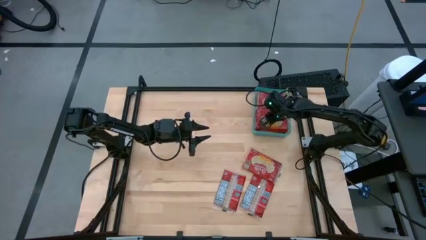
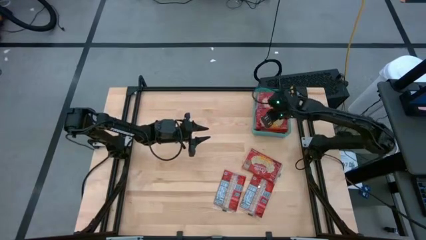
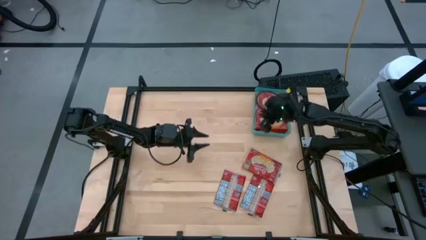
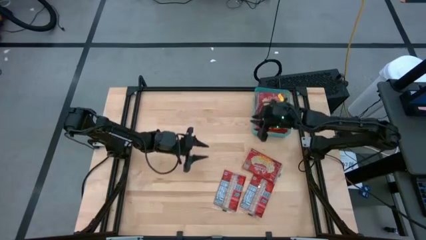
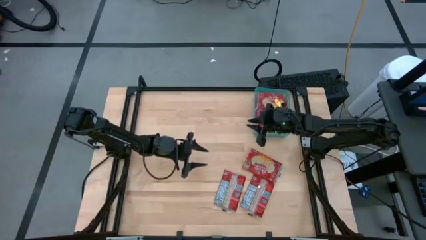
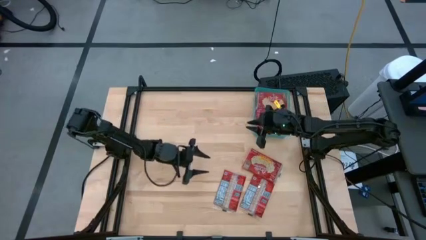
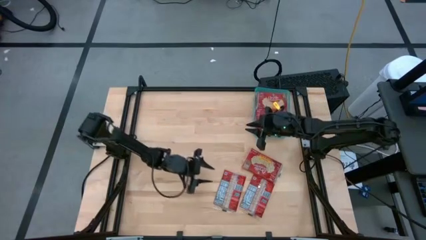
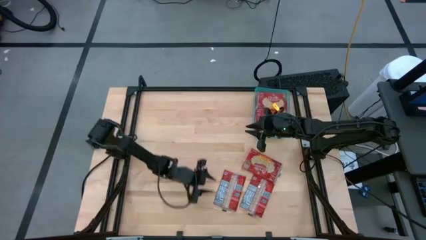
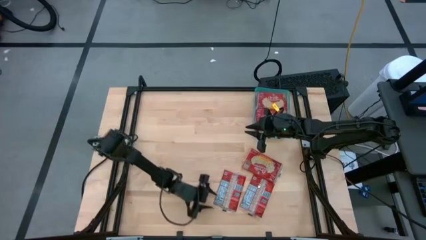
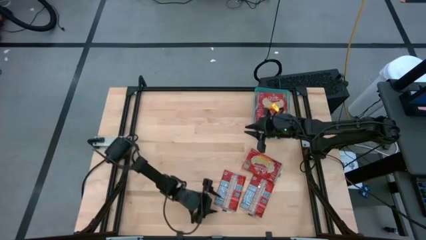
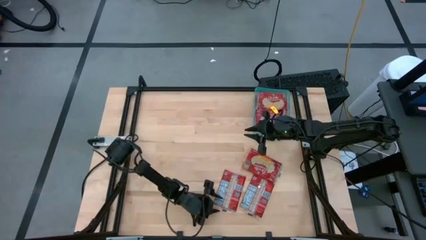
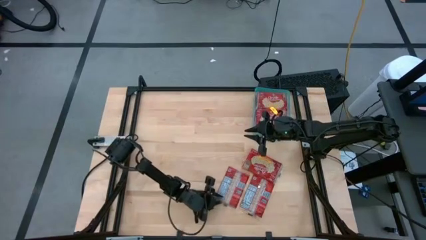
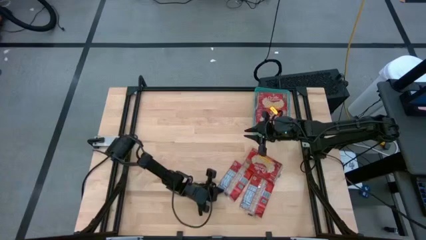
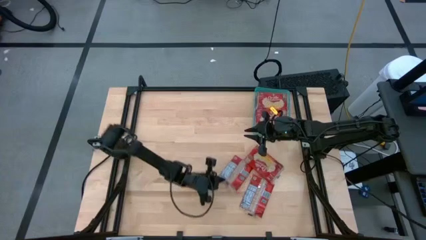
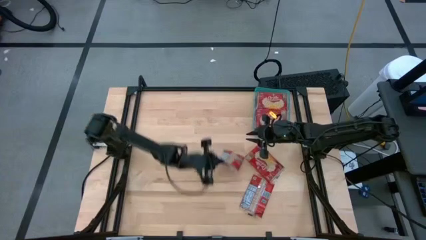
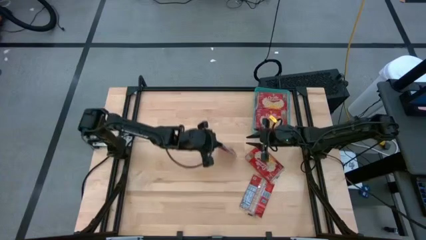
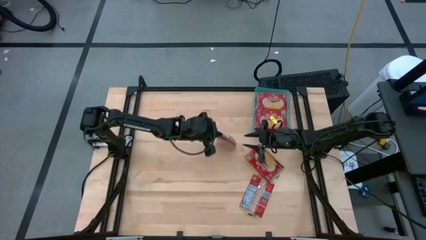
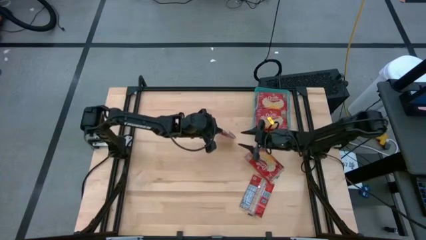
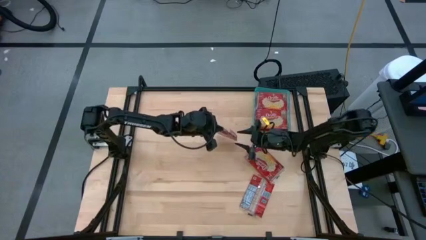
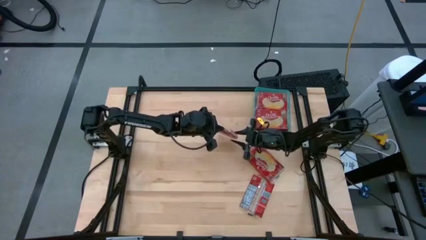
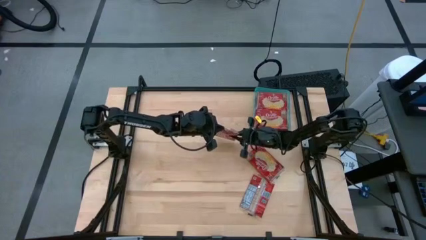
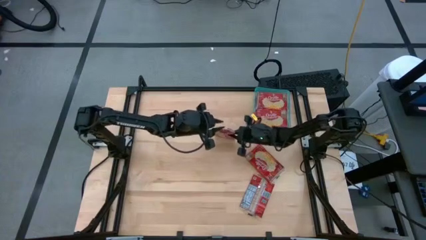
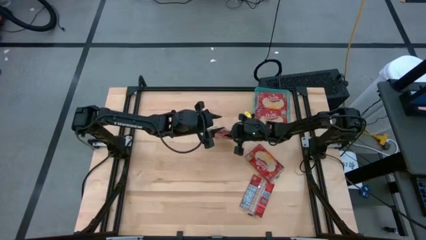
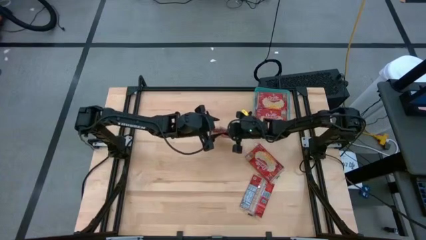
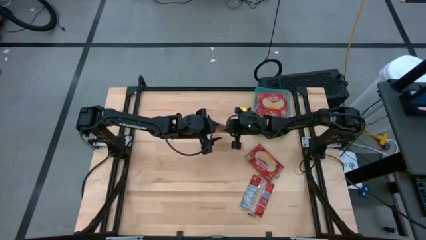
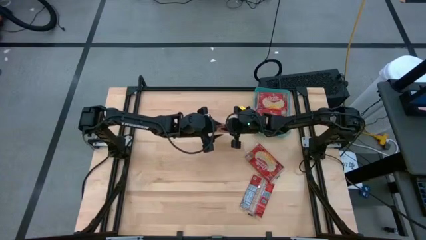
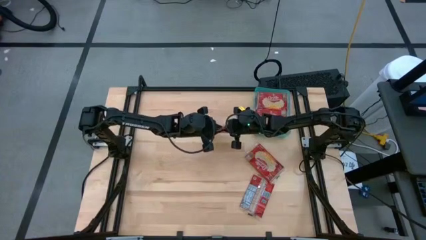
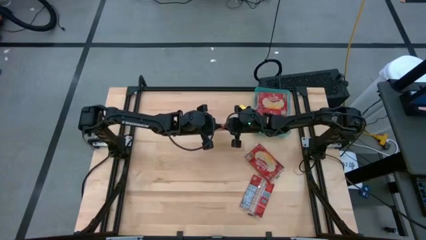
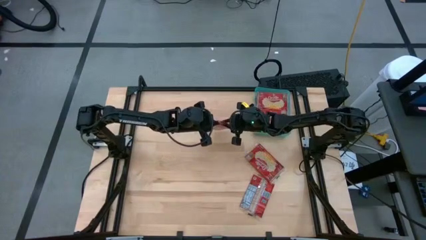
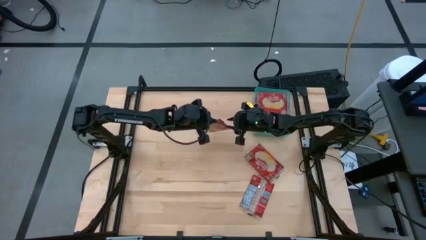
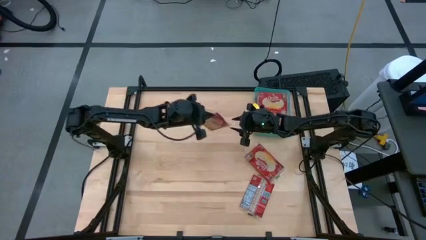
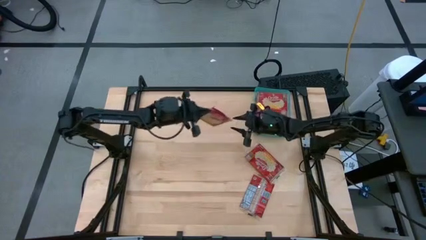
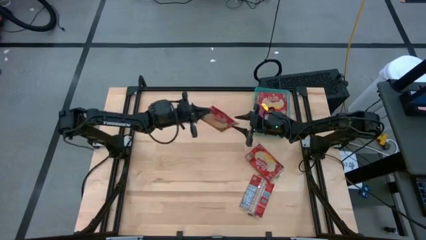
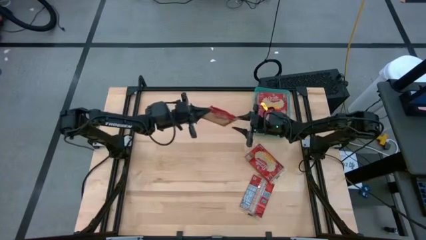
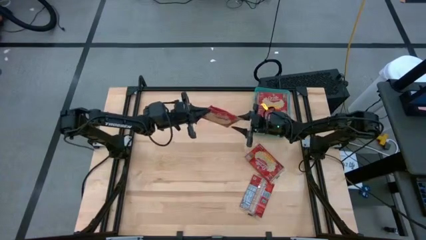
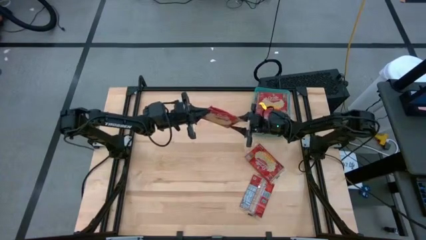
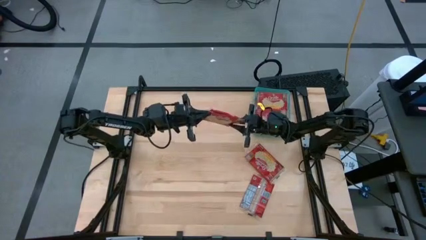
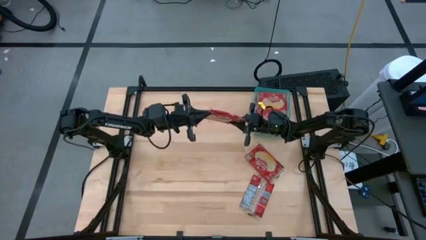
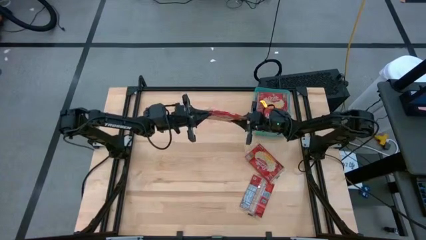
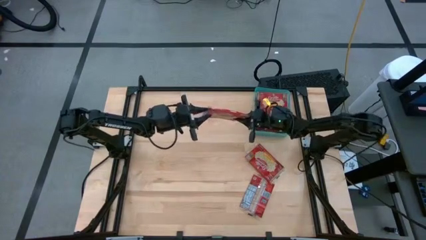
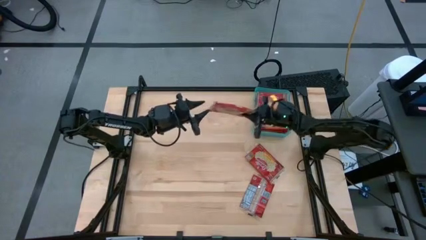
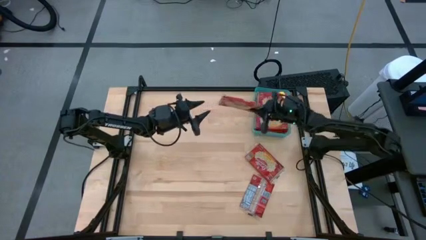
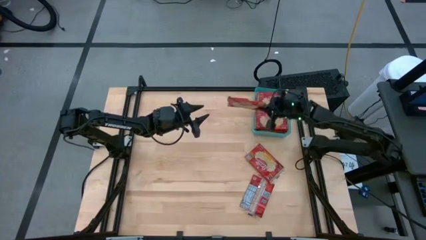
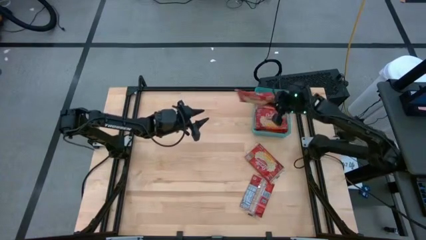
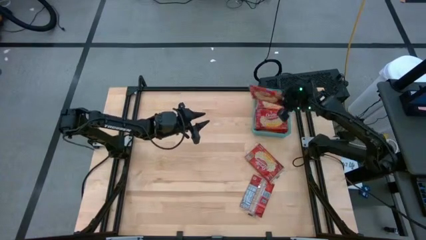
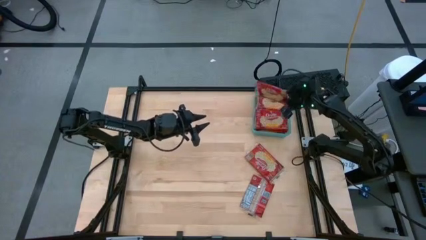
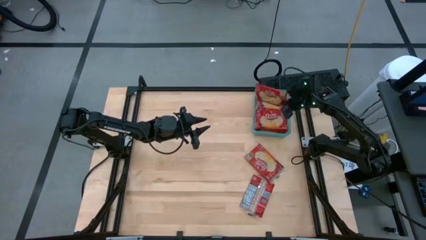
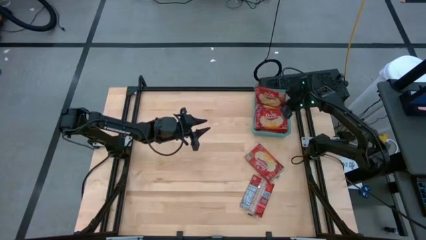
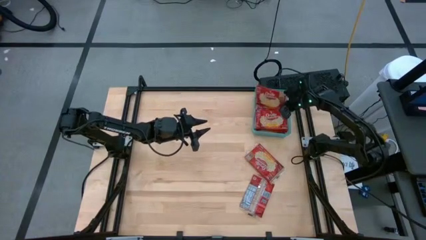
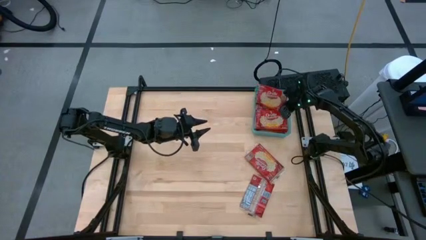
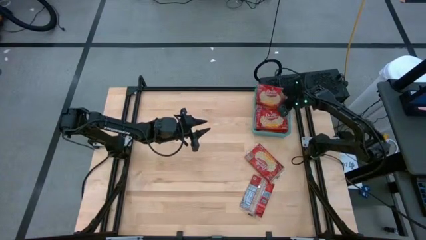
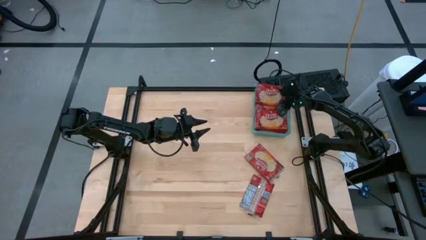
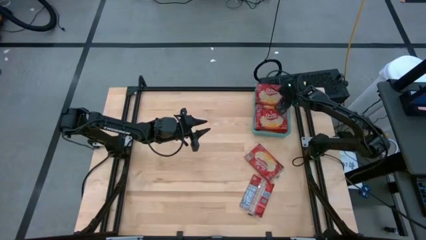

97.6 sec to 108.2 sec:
Task: Sort popcorn bags into baskets
Put the left red popcorn bag into the green bin

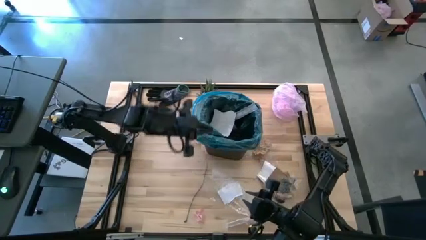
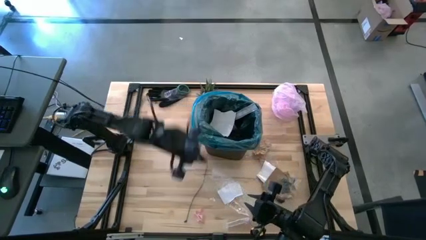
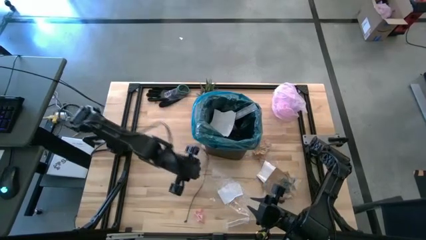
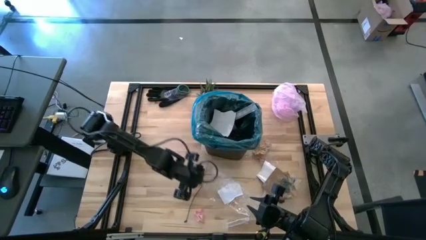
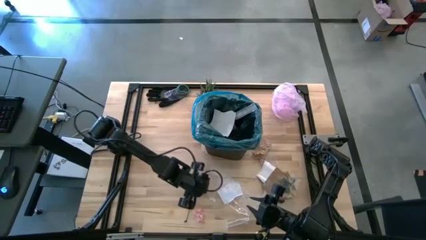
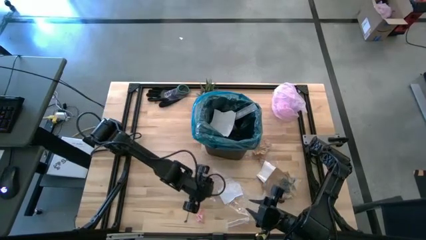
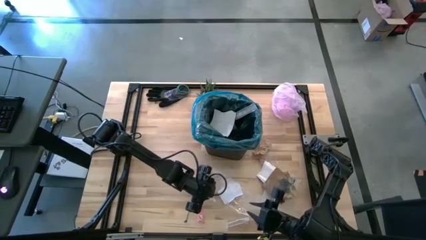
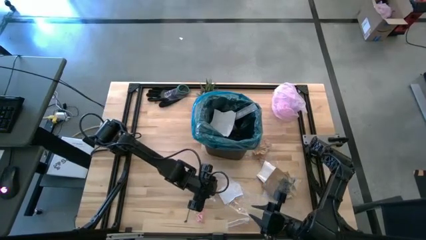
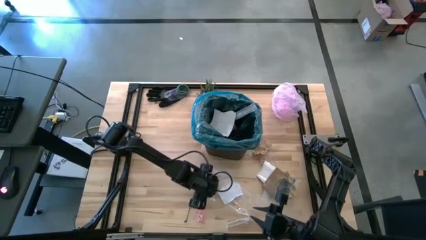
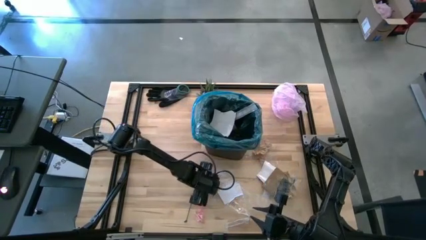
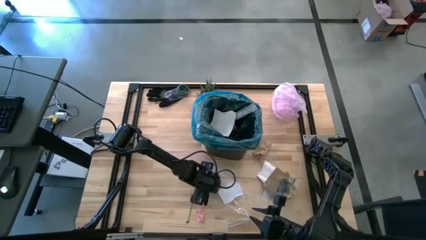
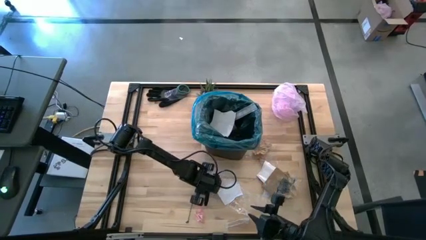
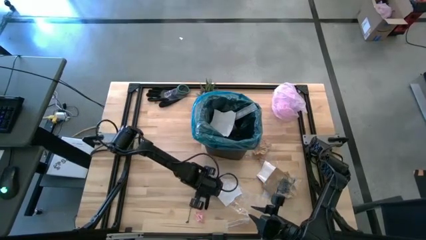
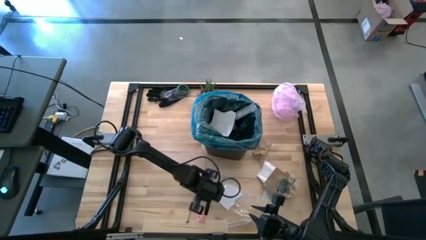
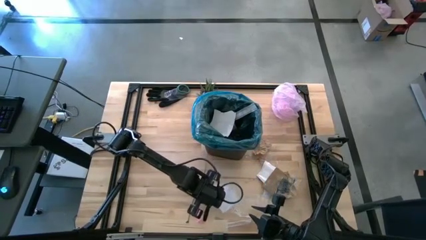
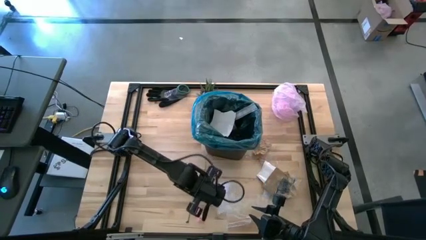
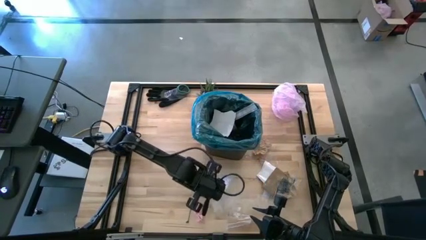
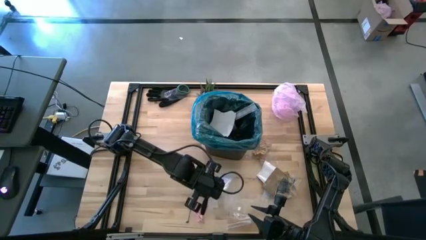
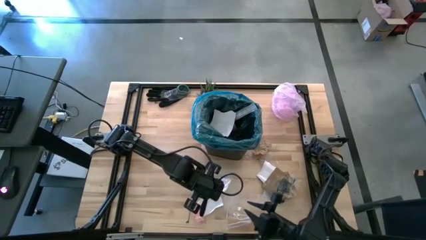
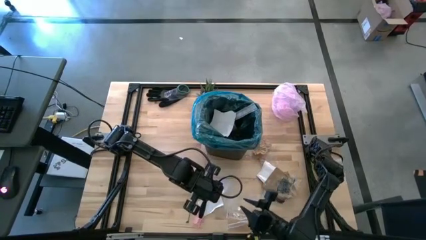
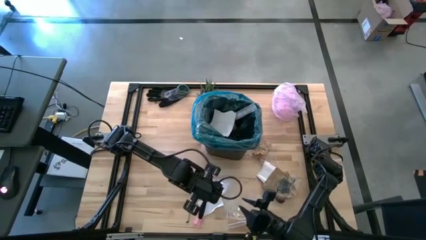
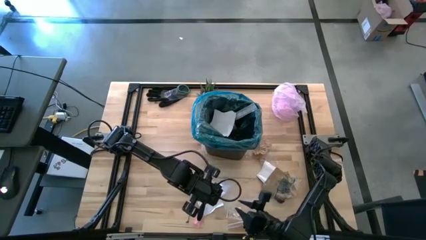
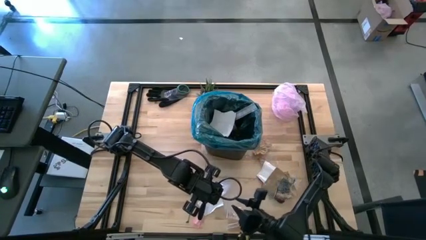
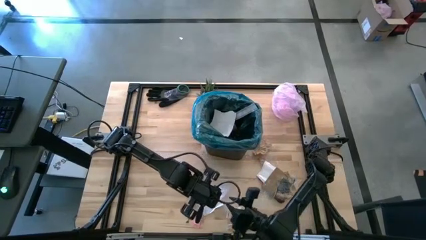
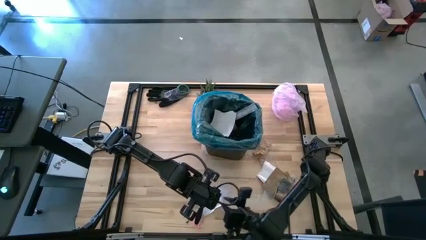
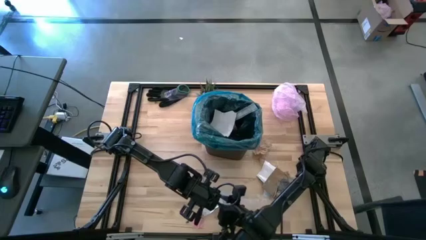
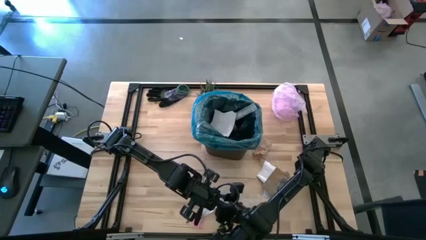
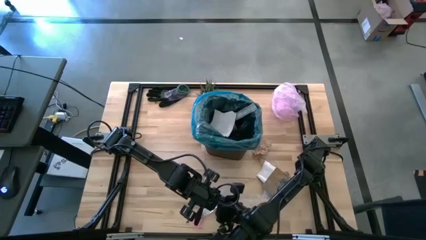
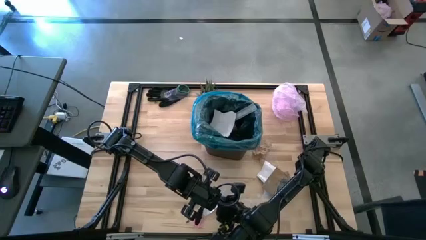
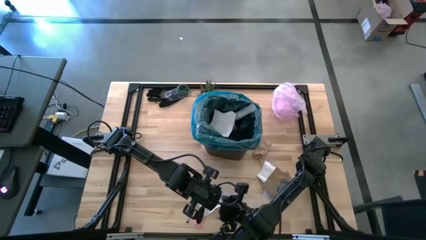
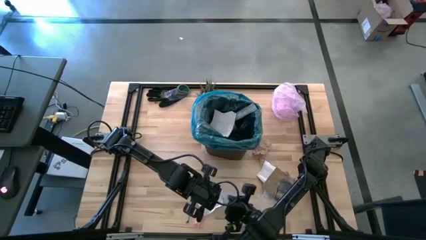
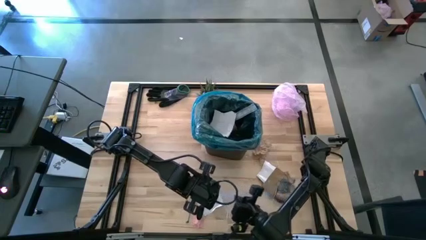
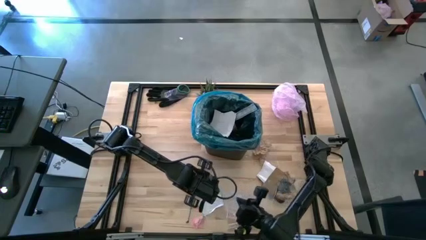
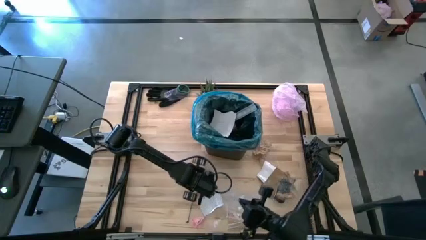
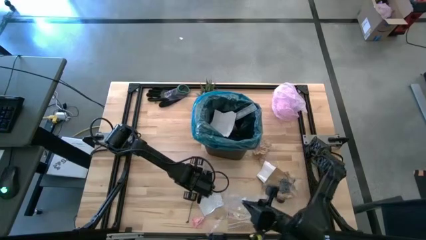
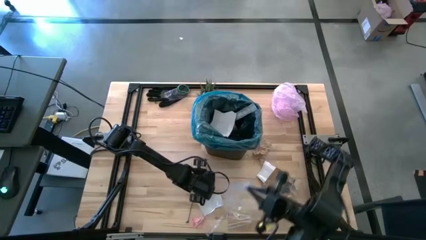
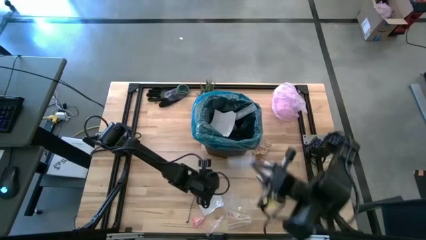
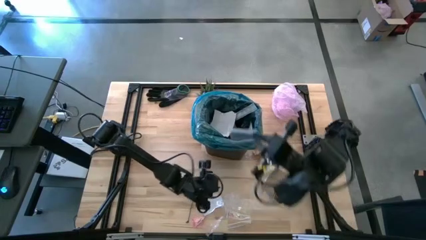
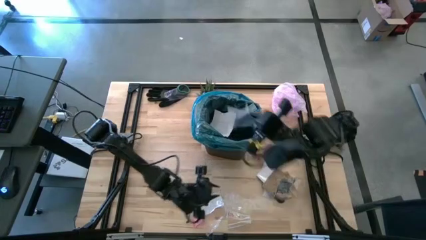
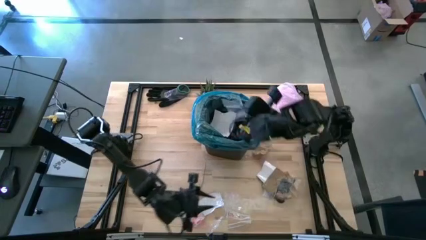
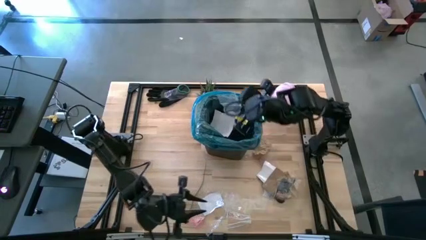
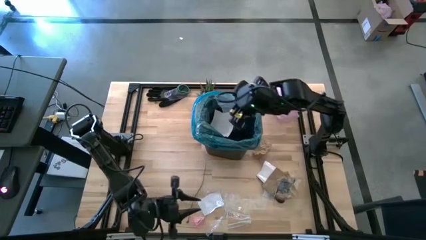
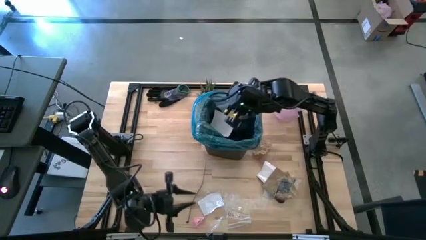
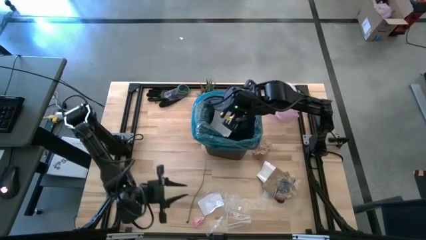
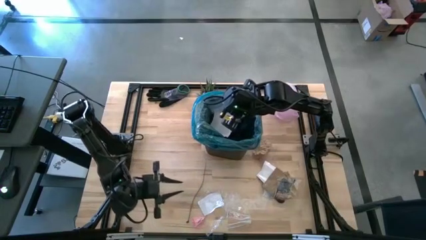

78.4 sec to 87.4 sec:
Task: place trash/remove bag and relplace
Put the transparent plastic into the trash bin
